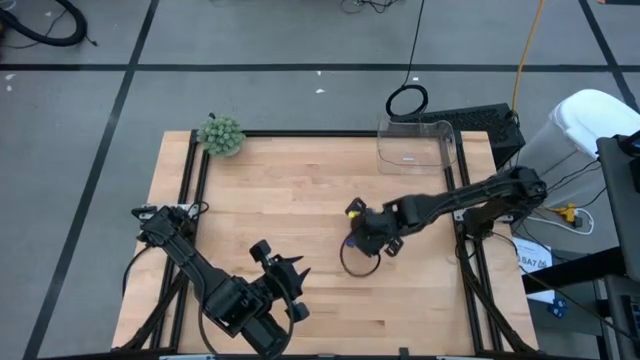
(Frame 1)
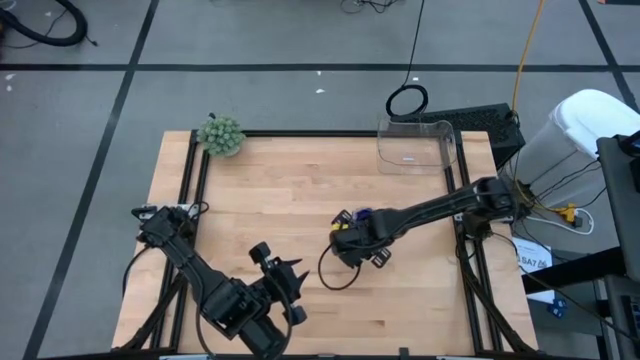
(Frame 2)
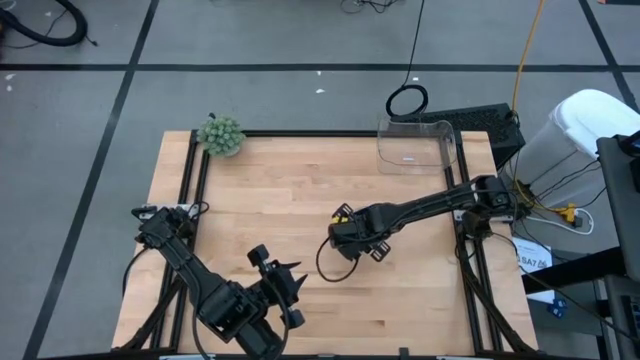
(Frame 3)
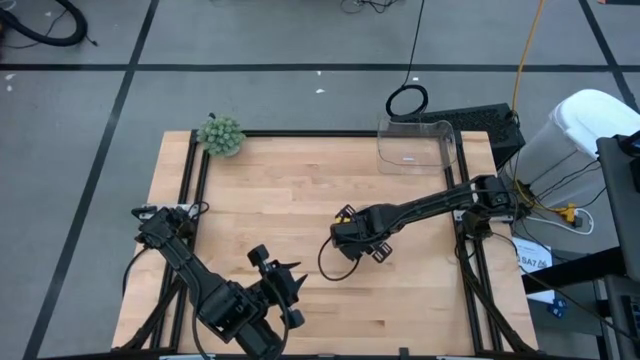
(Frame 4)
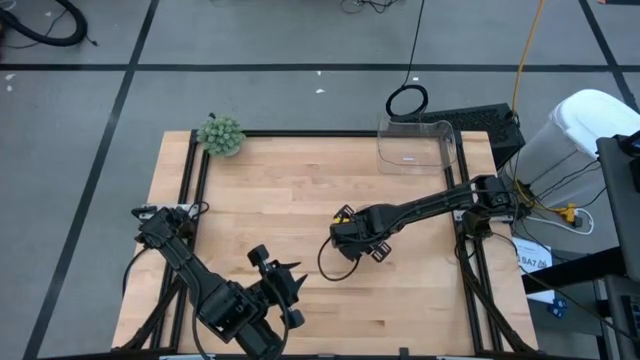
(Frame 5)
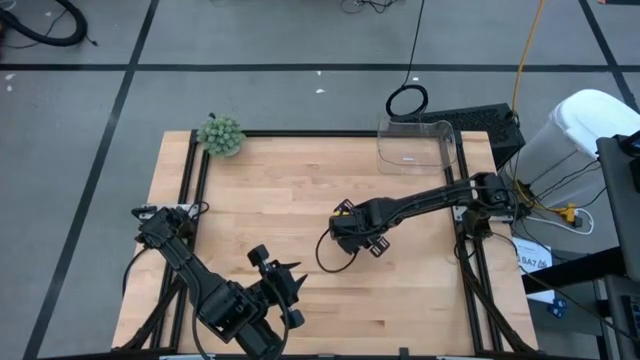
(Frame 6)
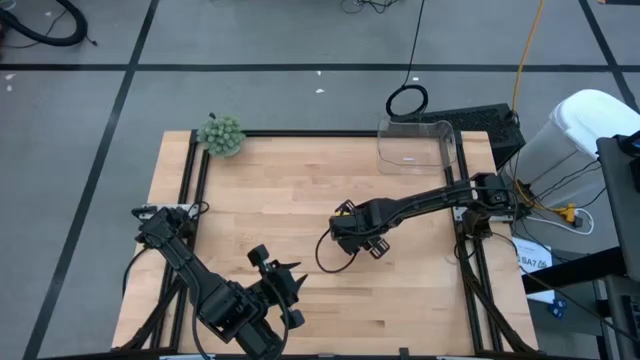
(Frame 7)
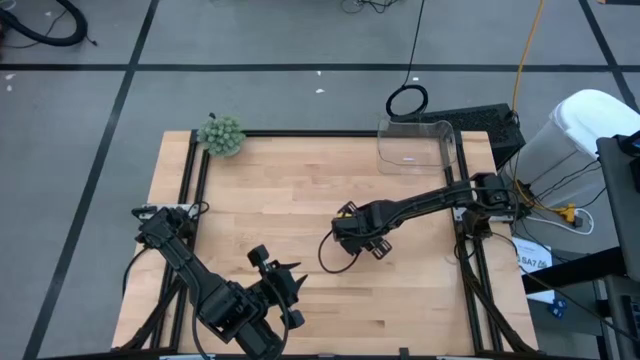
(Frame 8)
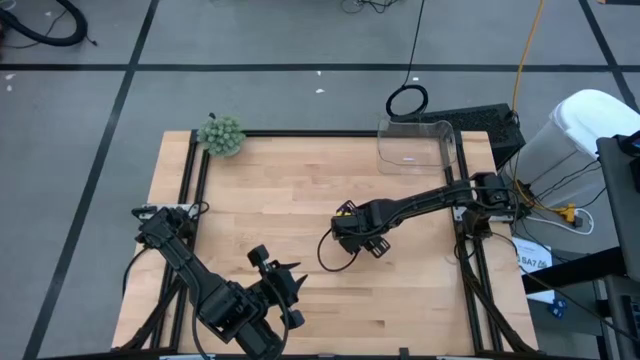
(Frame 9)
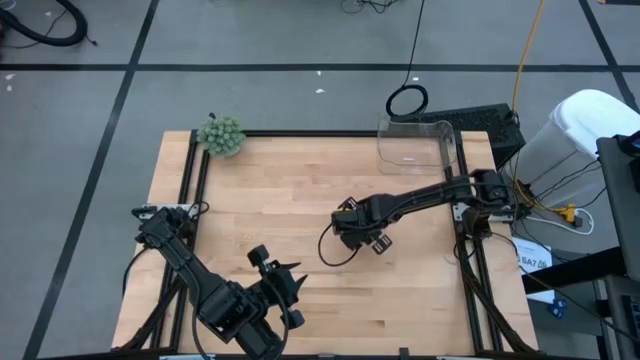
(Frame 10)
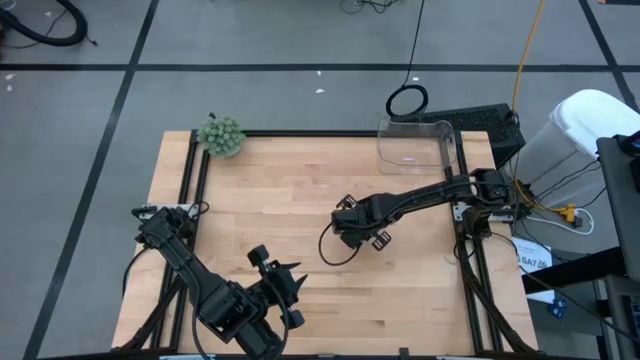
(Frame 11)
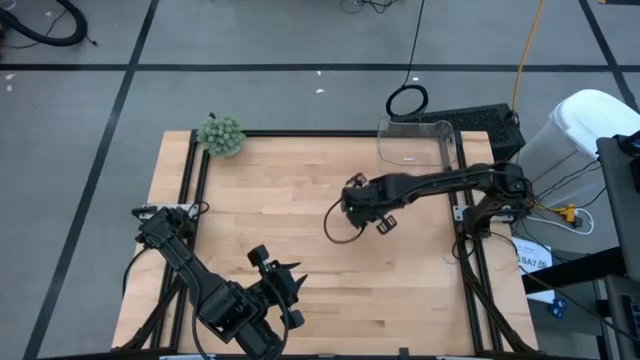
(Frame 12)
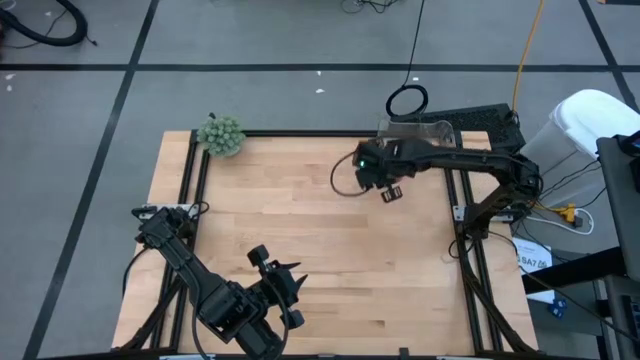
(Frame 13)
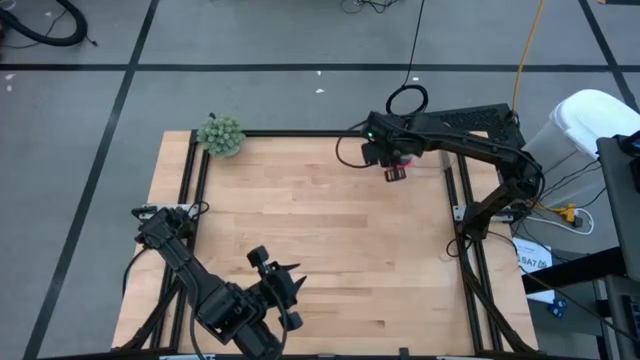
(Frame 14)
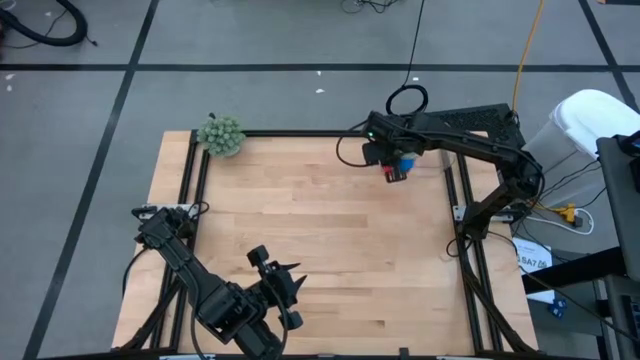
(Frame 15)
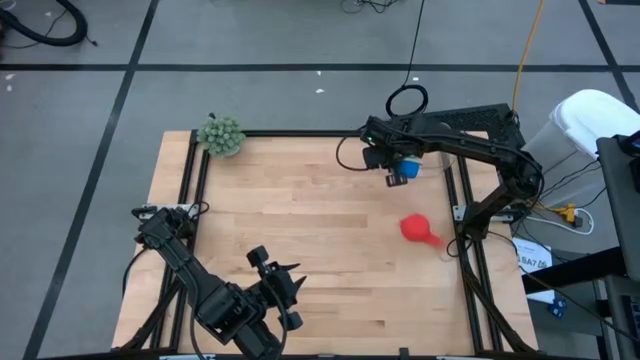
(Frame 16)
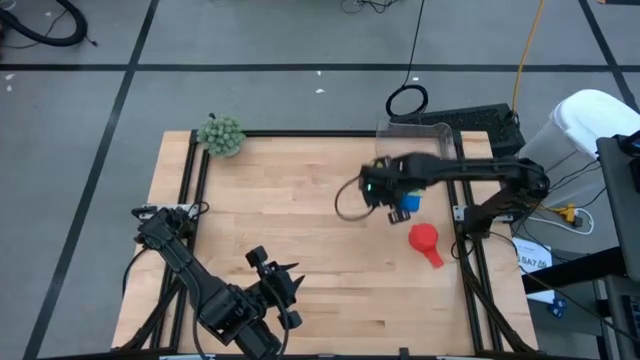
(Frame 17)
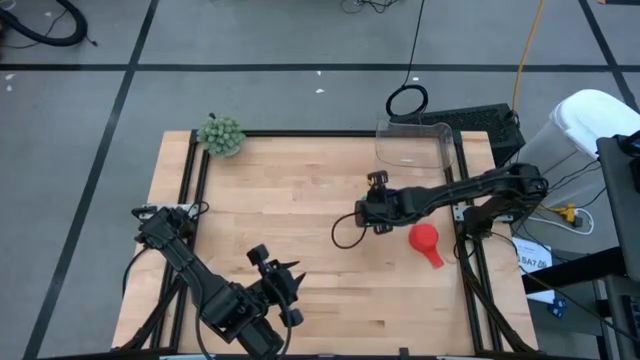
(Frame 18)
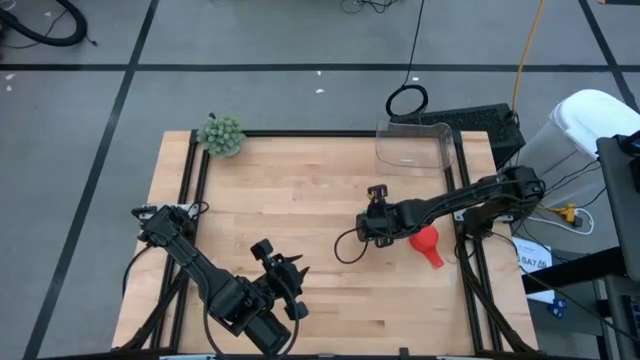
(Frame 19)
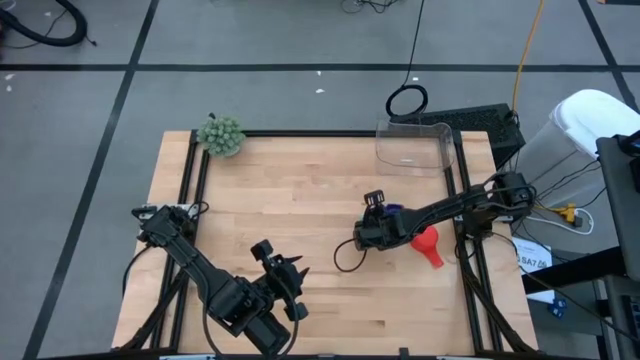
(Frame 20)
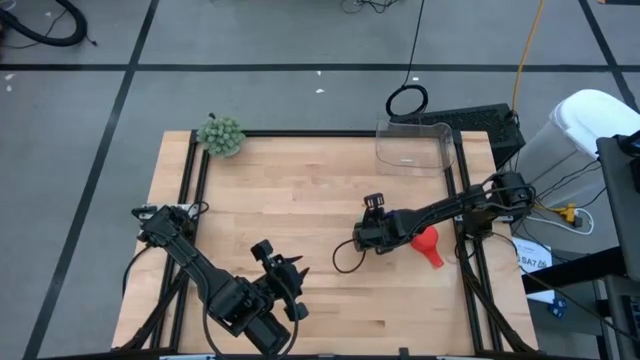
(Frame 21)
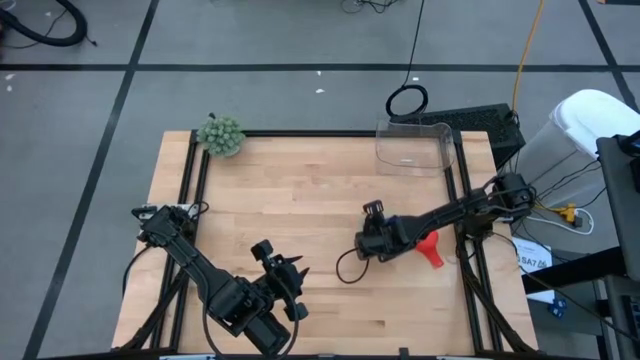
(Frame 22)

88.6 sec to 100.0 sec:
Task: Nest measuring cups in basket
Put the stack of measuring cups into the transparent bin

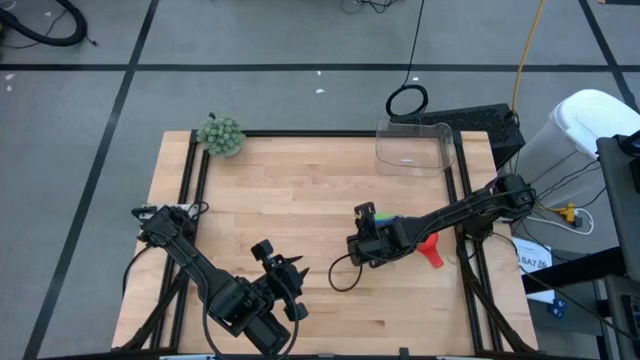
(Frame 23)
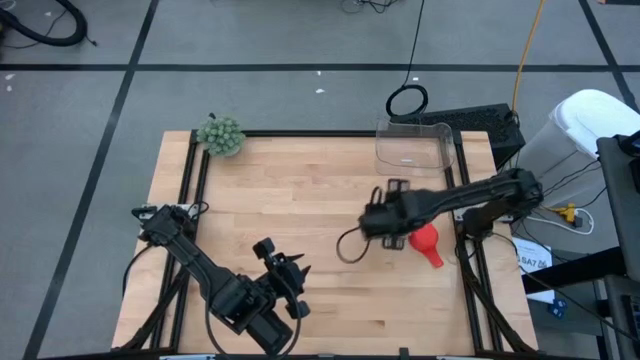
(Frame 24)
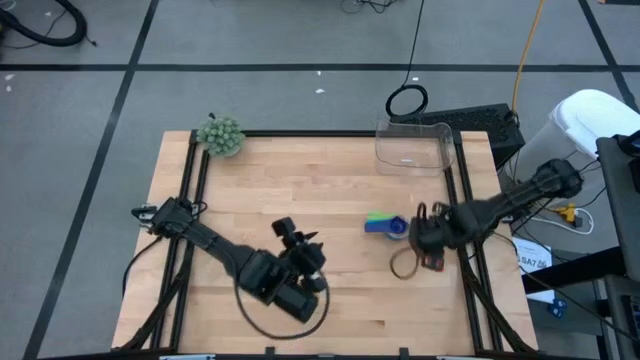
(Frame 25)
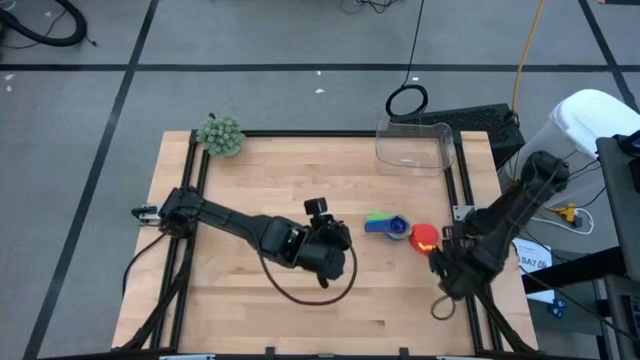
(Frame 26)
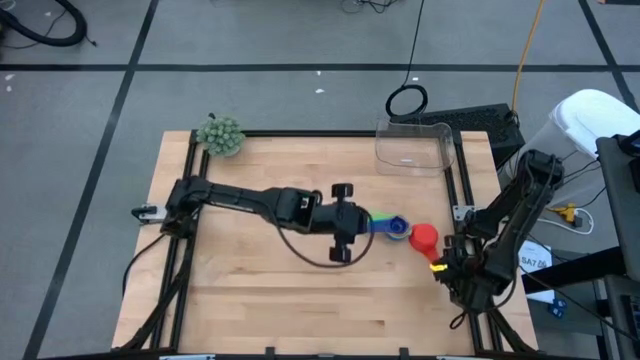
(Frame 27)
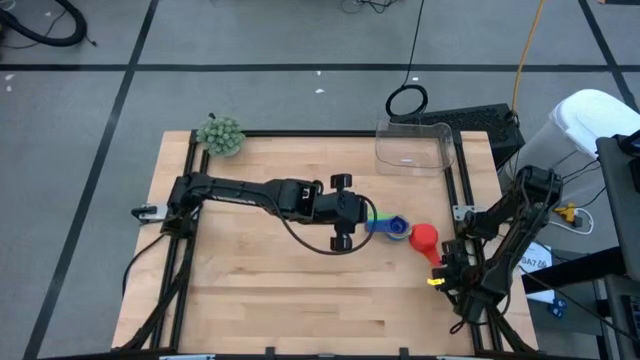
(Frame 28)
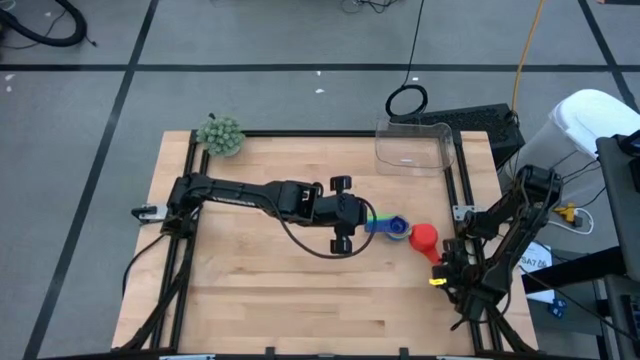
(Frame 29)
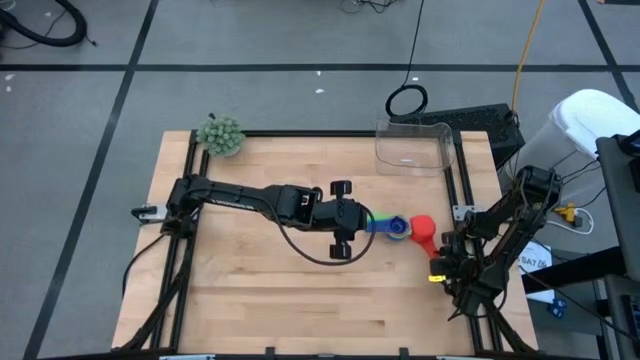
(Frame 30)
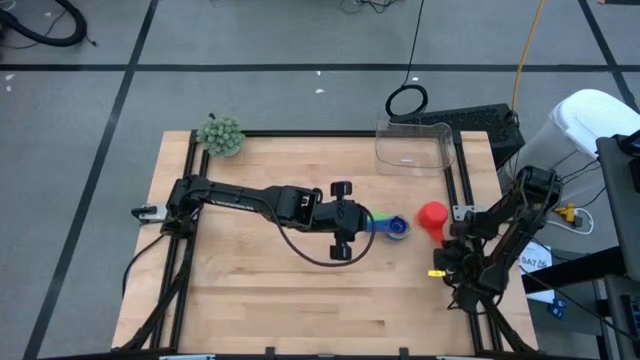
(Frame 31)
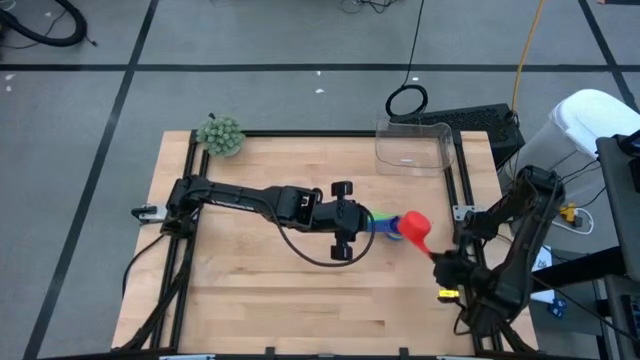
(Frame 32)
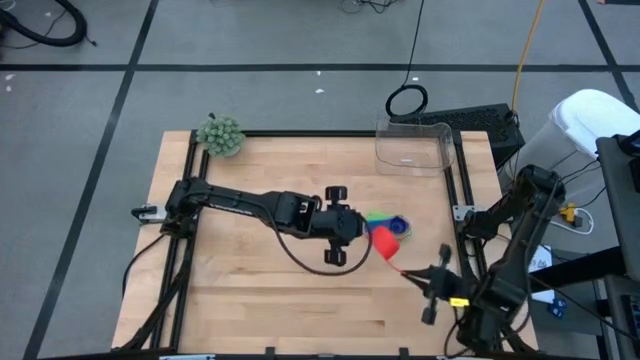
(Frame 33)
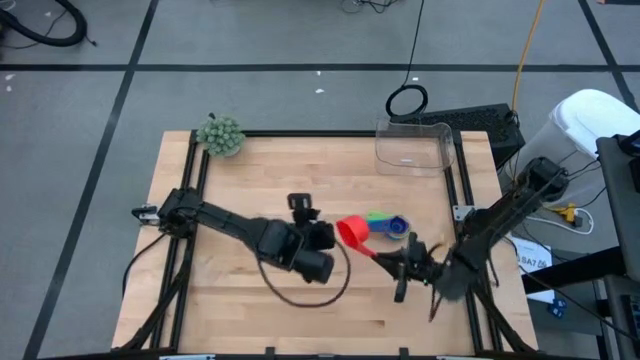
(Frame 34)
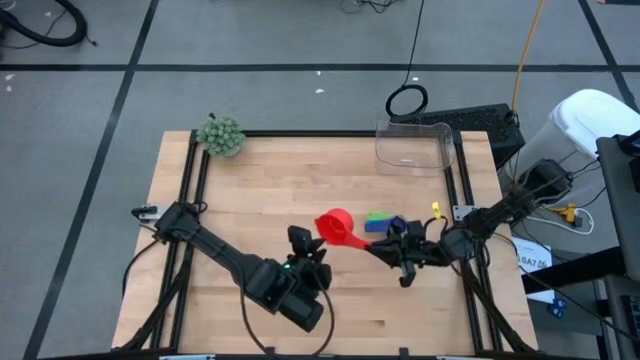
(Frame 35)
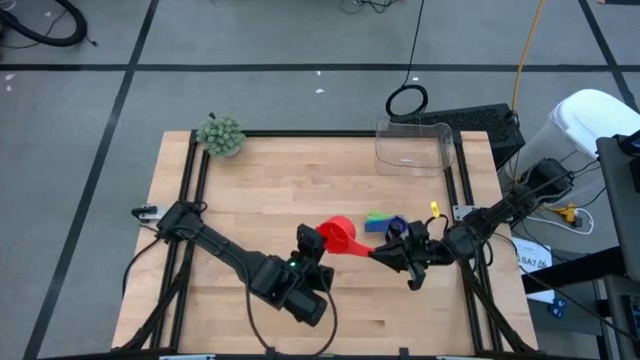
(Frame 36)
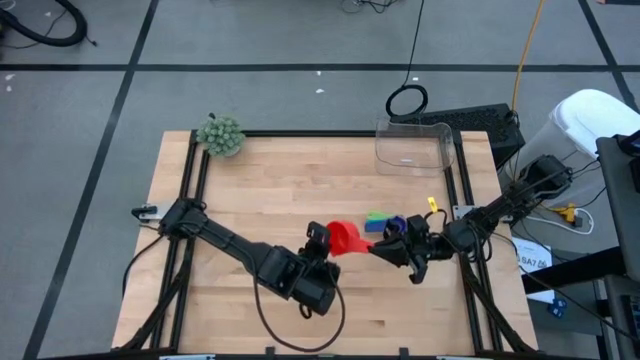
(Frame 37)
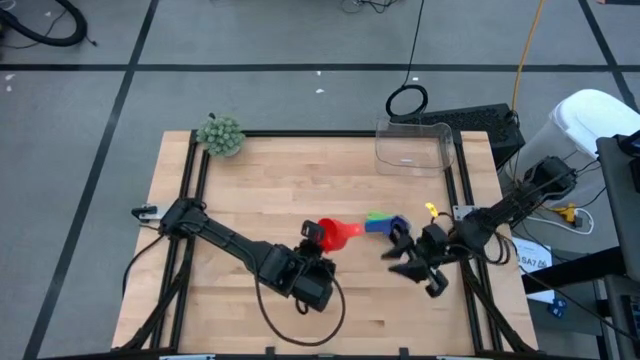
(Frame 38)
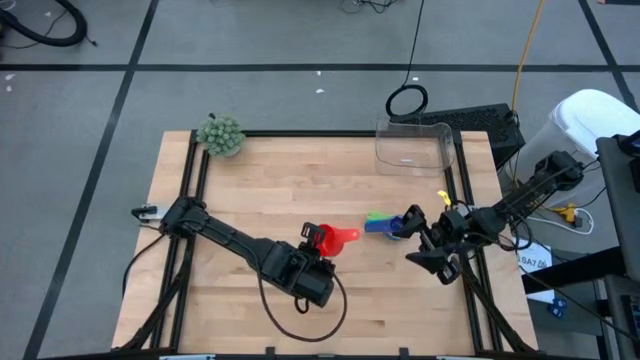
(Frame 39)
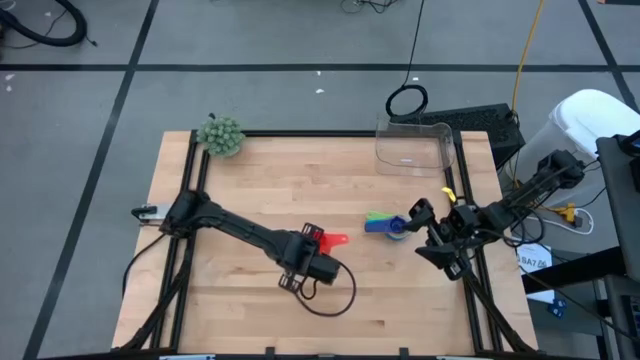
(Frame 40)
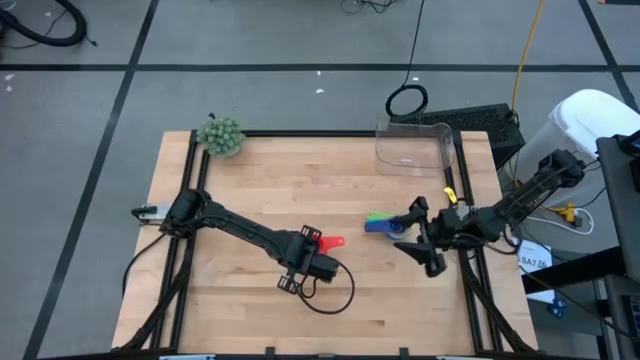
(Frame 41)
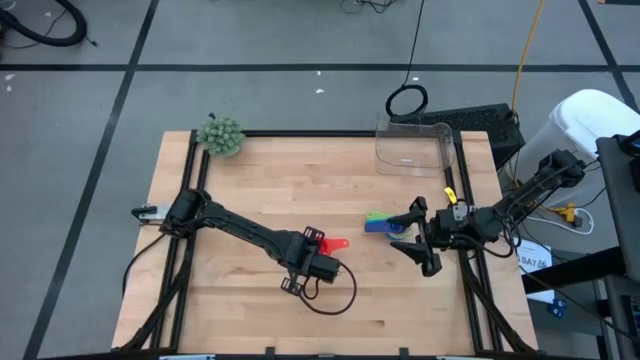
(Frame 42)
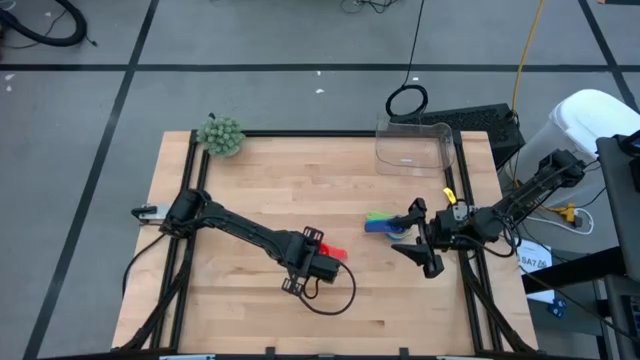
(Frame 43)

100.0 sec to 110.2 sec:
Prepare the orange measuring cup
